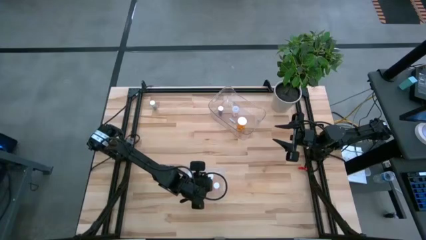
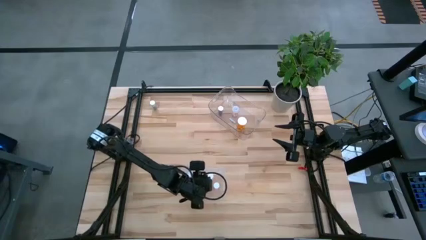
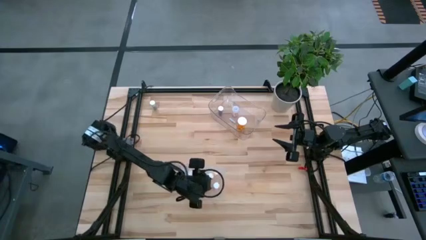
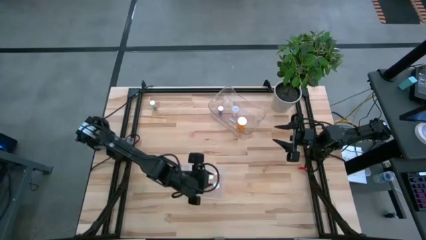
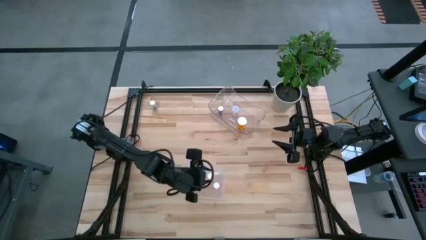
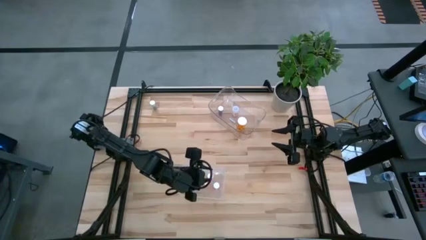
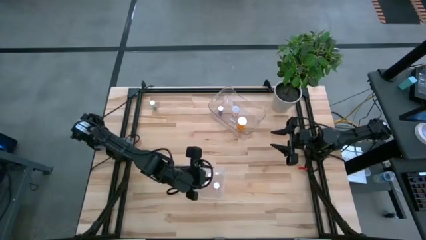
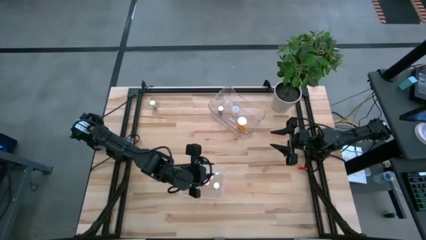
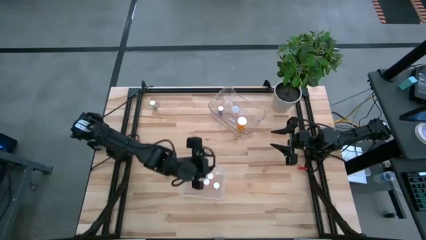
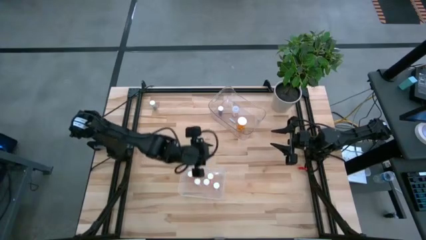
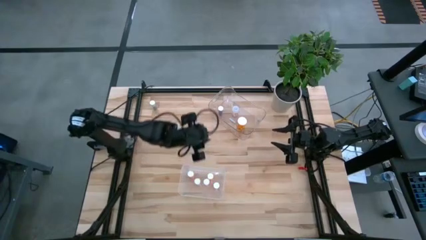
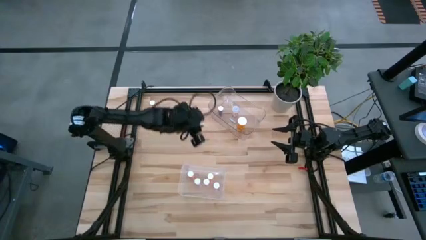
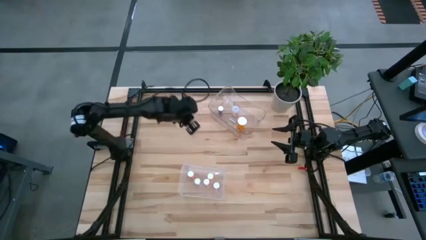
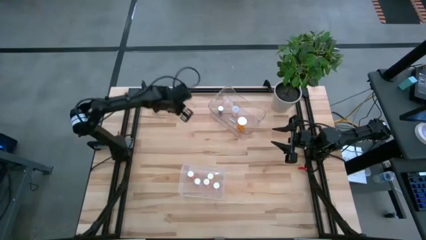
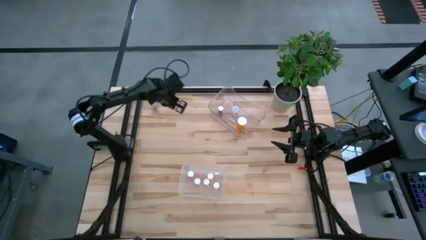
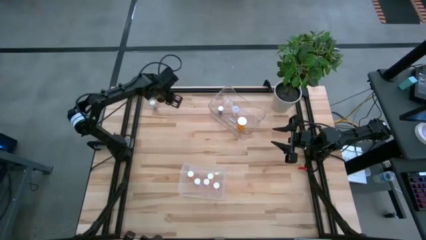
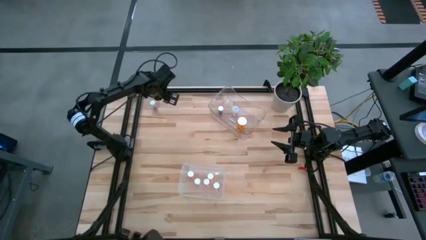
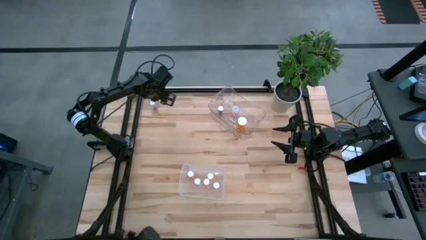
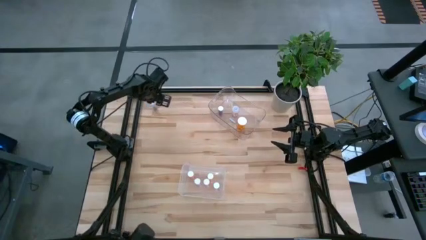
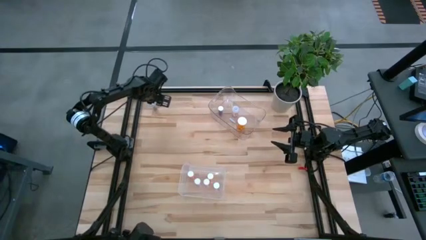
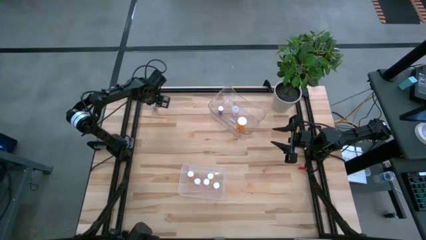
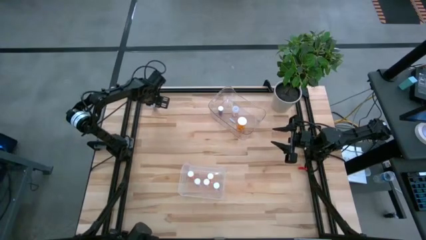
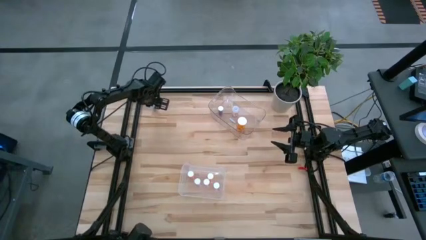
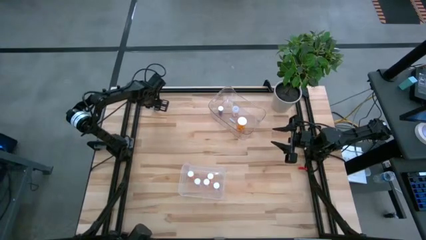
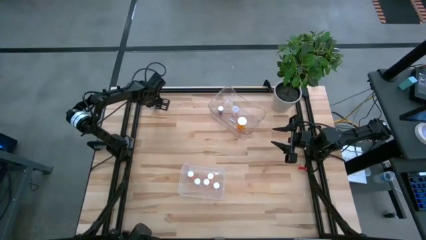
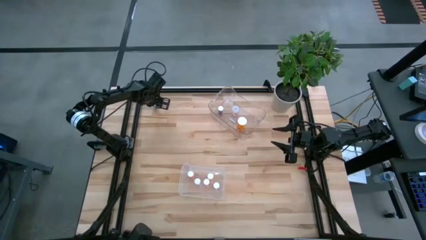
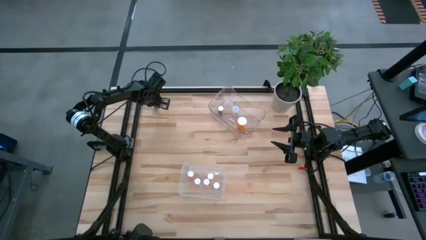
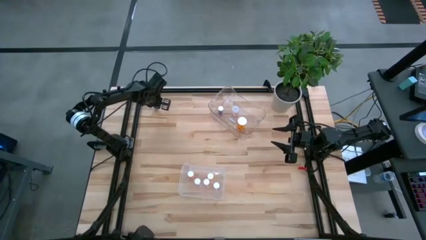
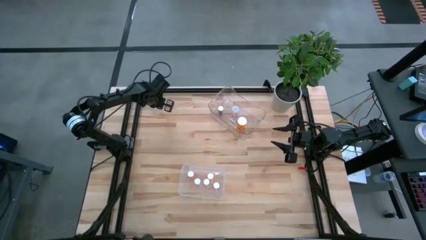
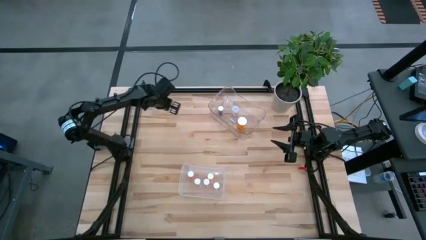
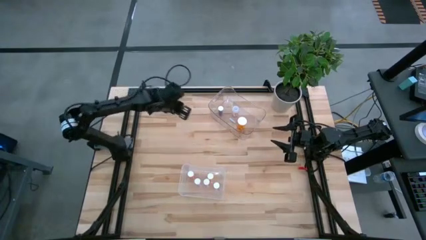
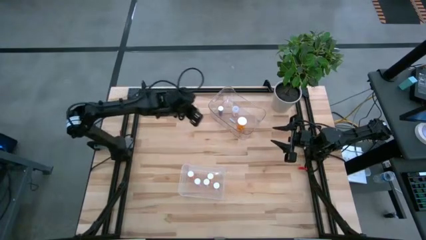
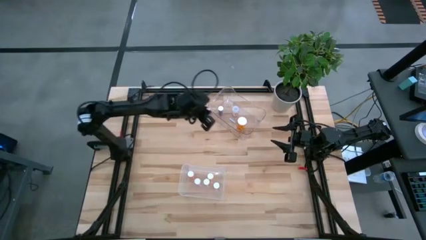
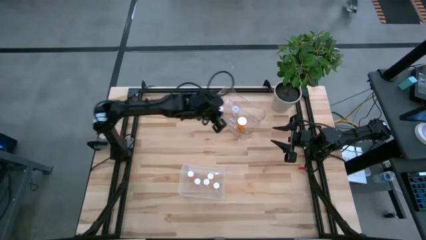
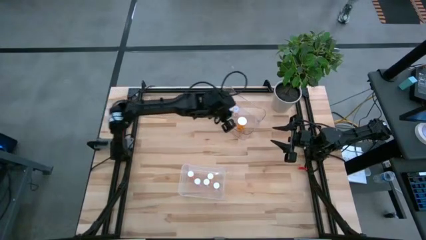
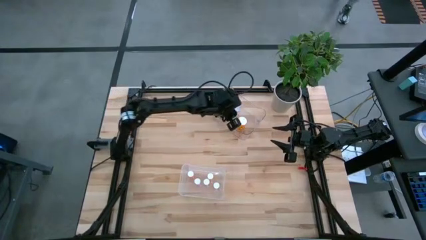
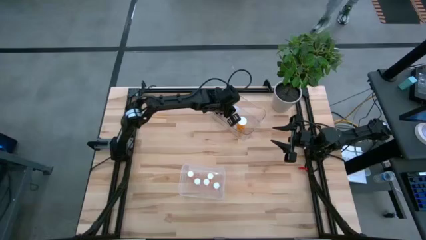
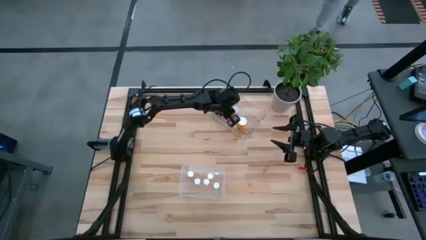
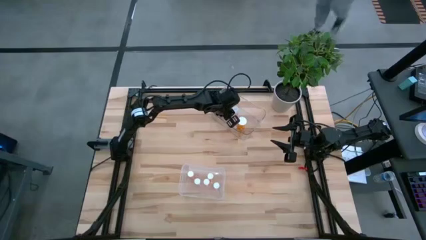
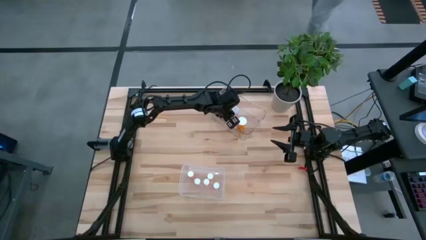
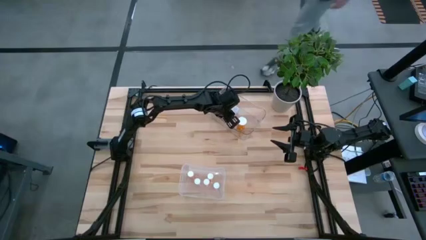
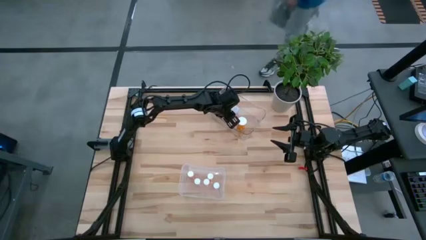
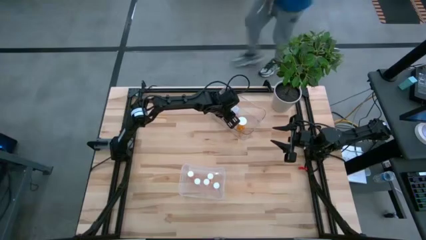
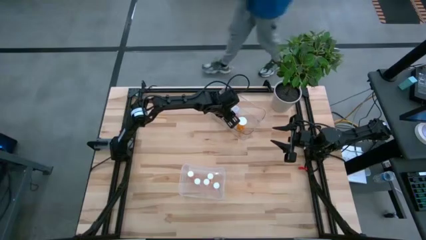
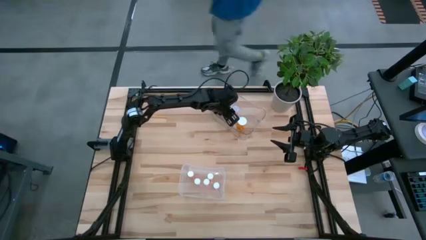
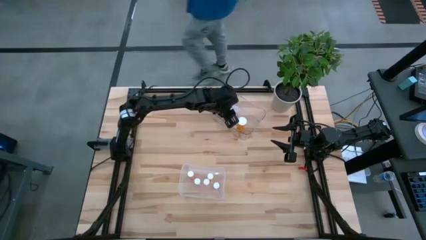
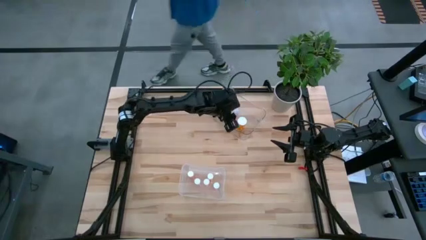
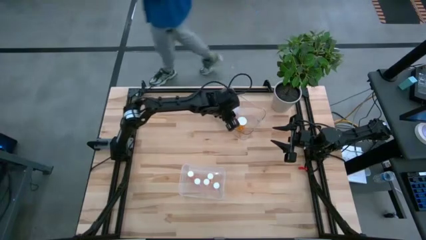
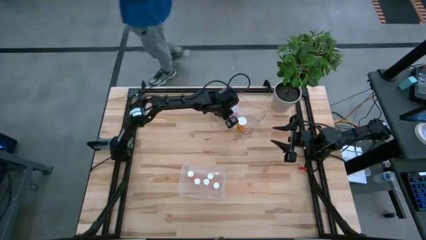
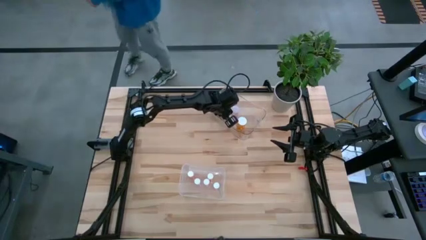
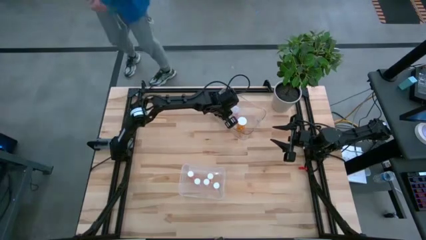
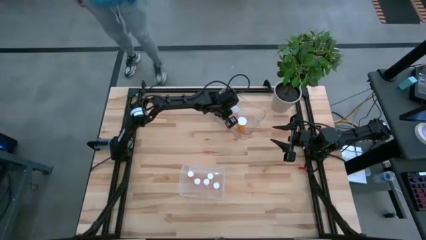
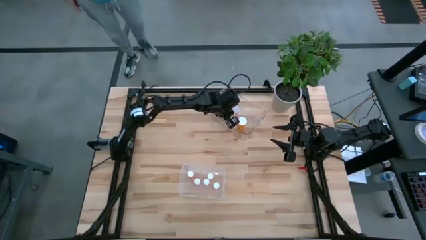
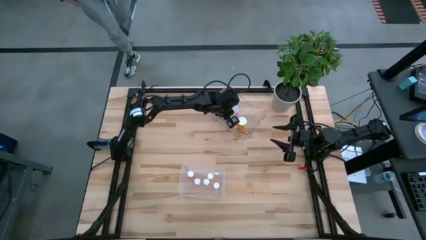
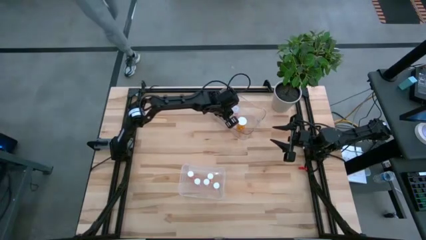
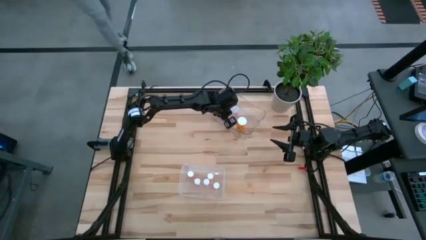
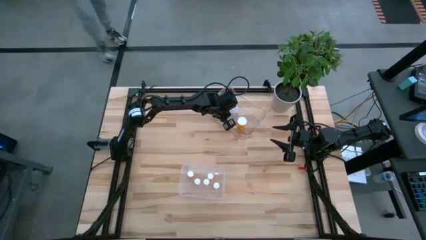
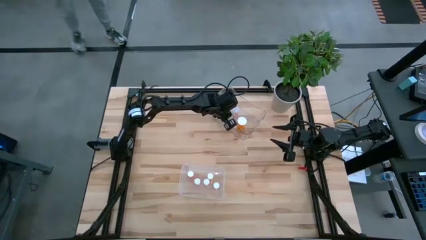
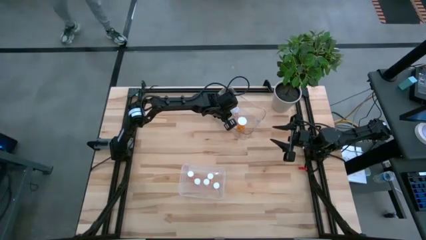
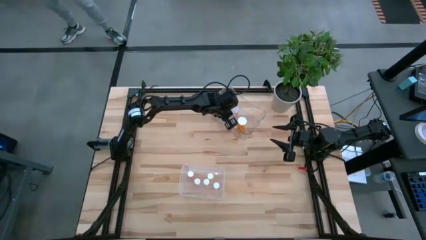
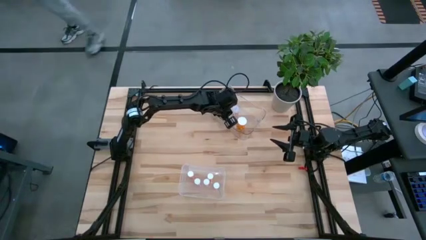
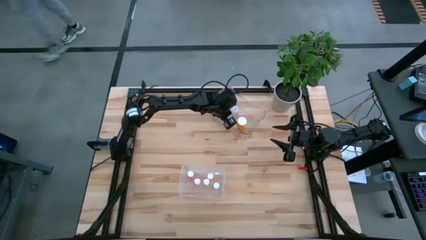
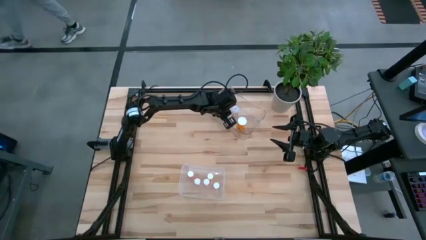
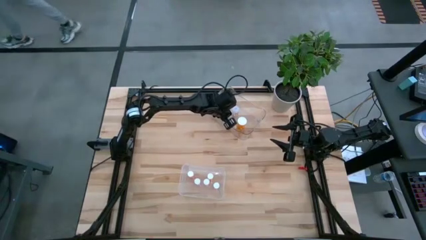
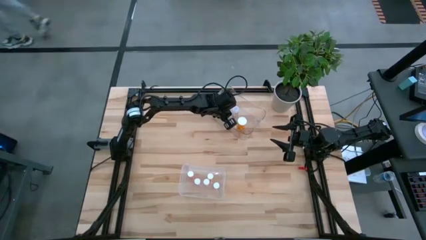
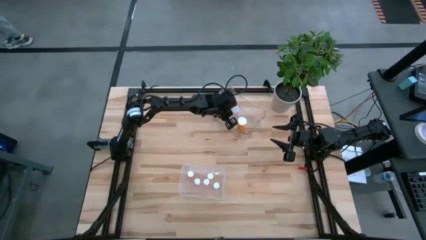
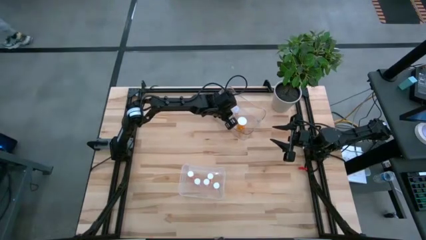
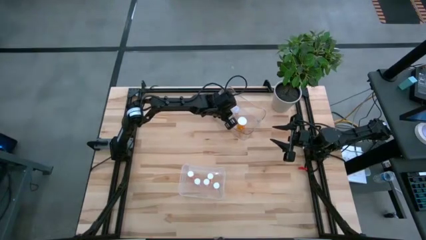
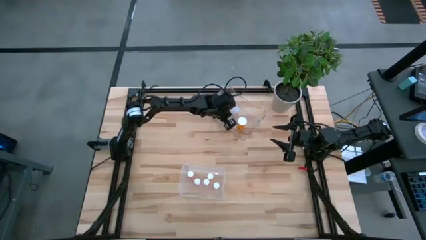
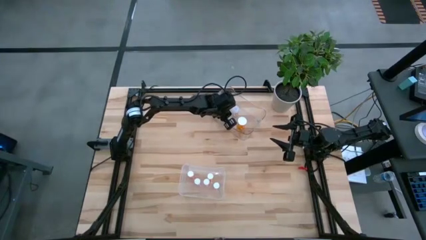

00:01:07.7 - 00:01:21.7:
Task: Pick and place medicine bottles into bin by pill shape (circle, oval)
Put the blue capsule bottle into the top transparent bin
